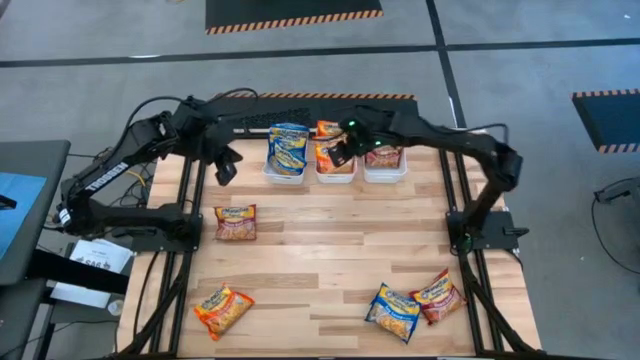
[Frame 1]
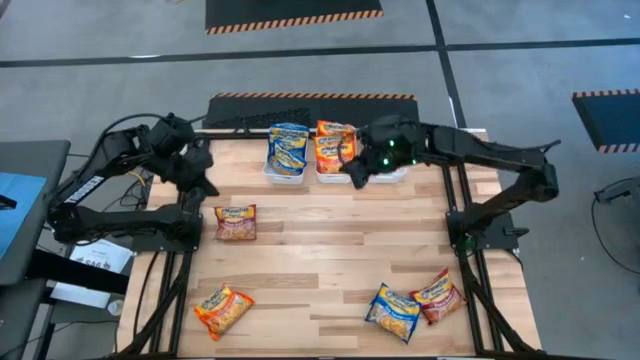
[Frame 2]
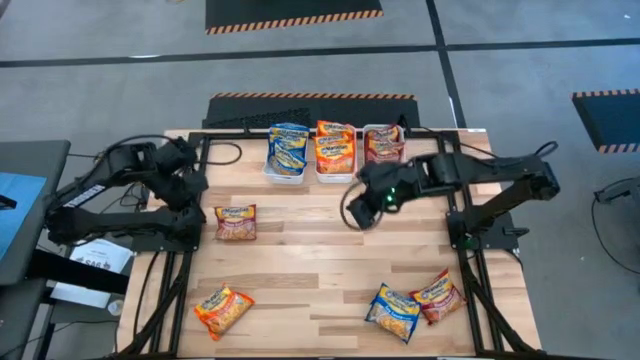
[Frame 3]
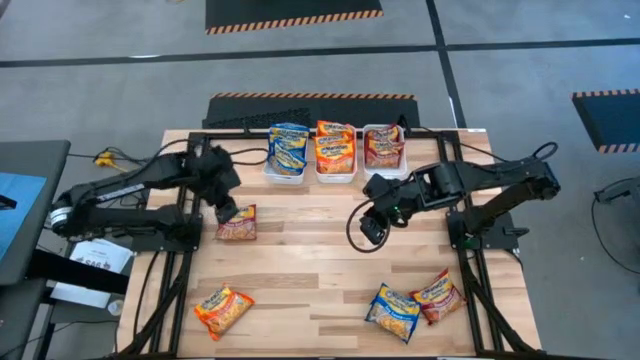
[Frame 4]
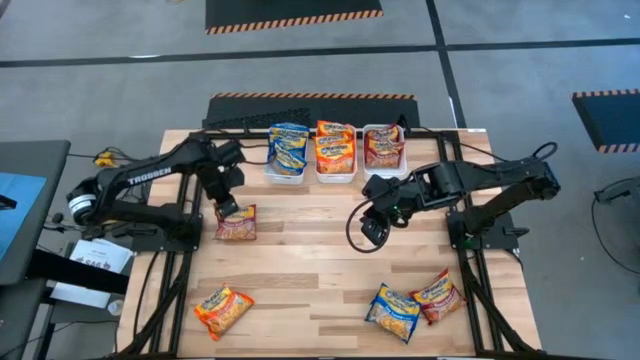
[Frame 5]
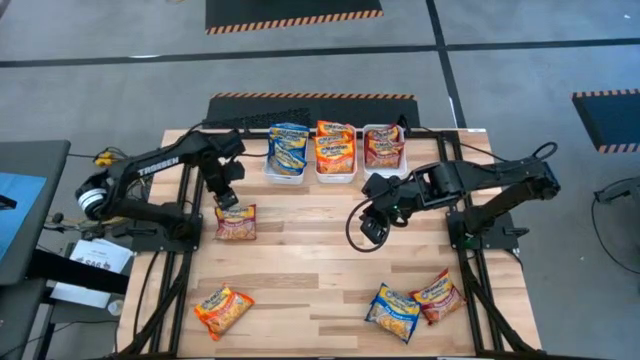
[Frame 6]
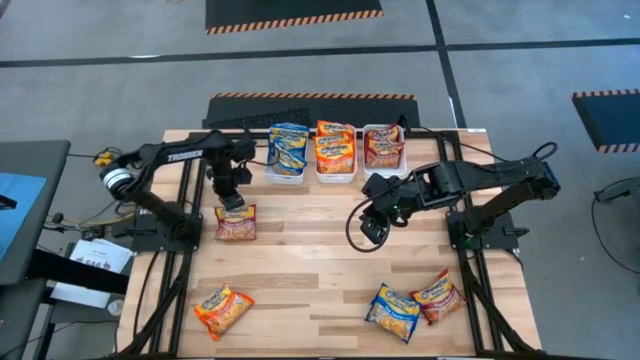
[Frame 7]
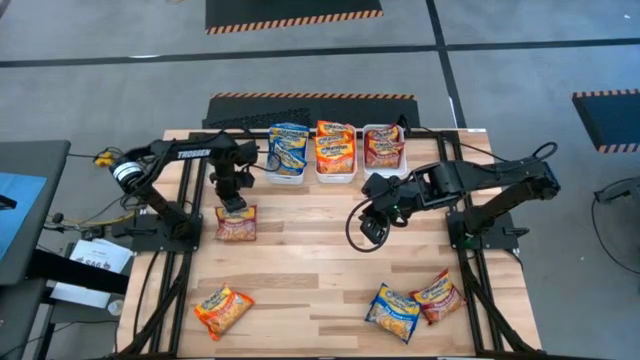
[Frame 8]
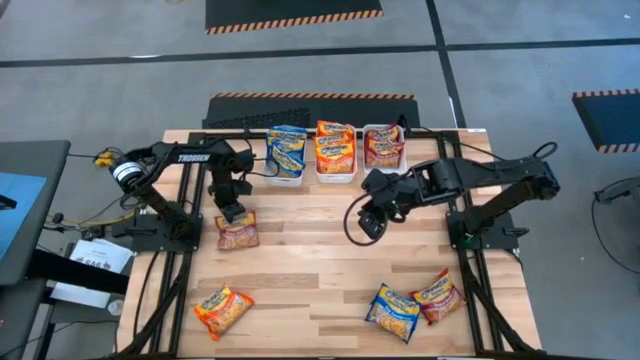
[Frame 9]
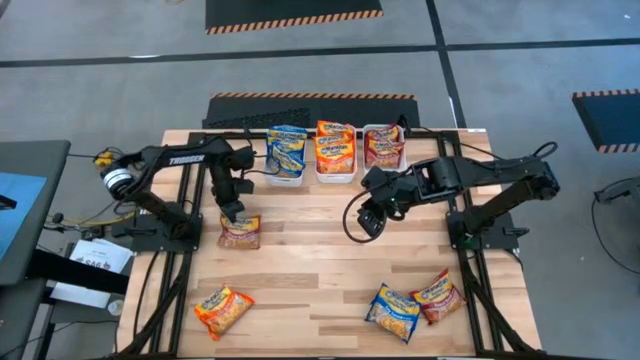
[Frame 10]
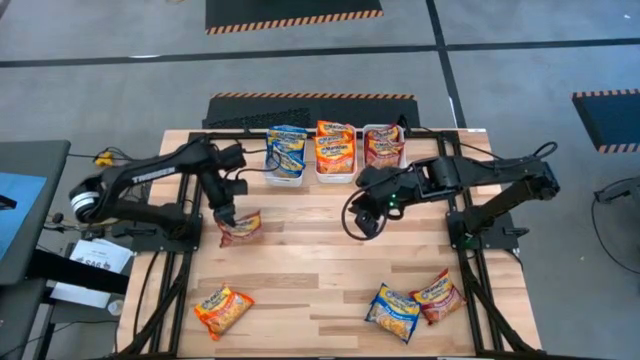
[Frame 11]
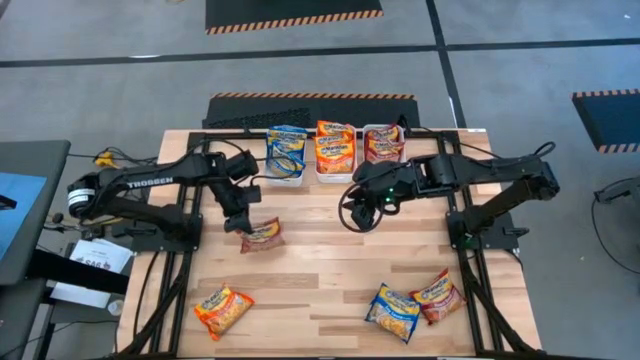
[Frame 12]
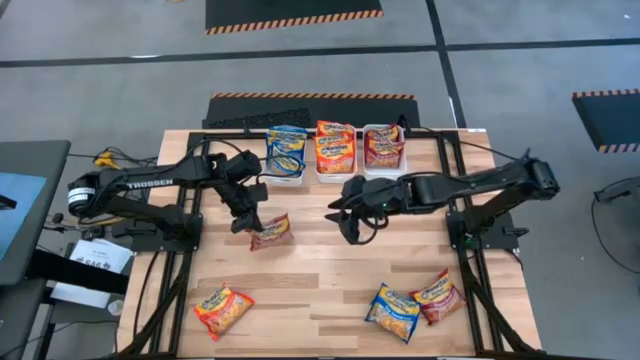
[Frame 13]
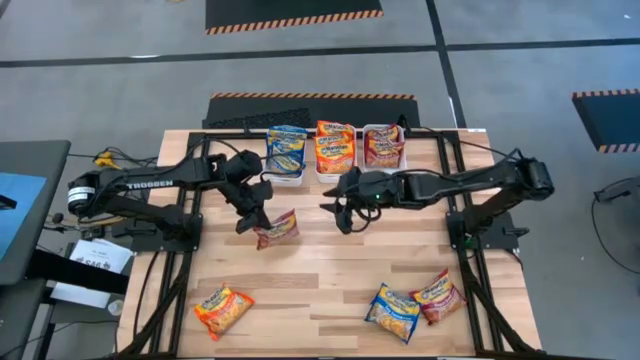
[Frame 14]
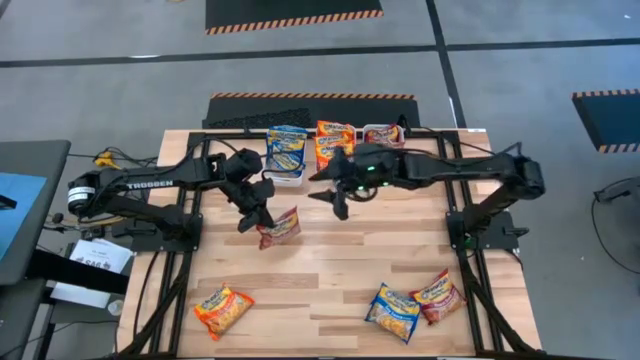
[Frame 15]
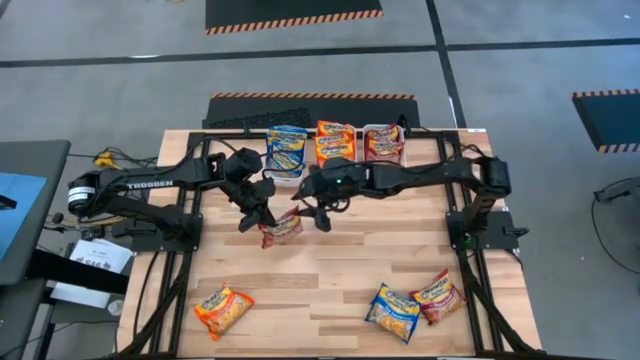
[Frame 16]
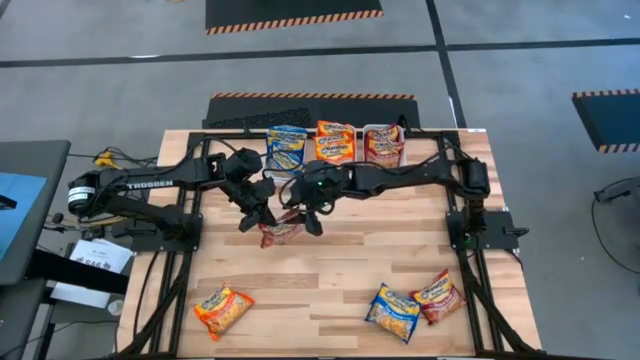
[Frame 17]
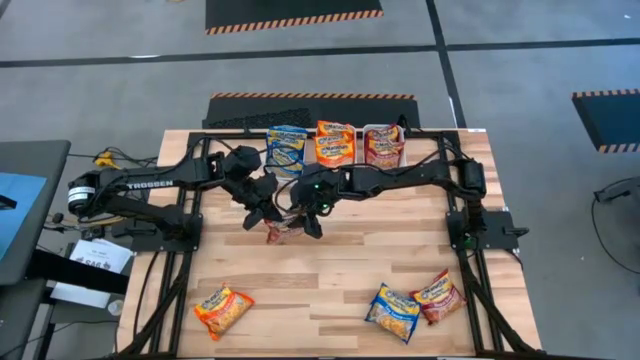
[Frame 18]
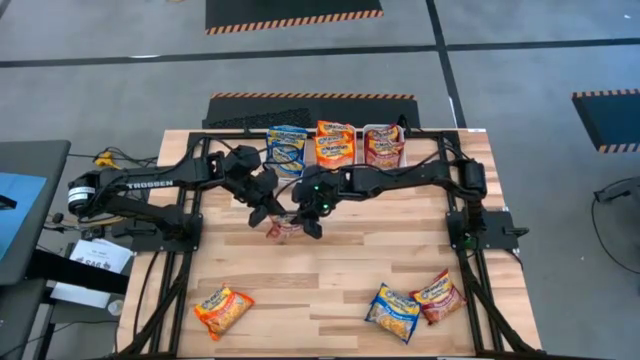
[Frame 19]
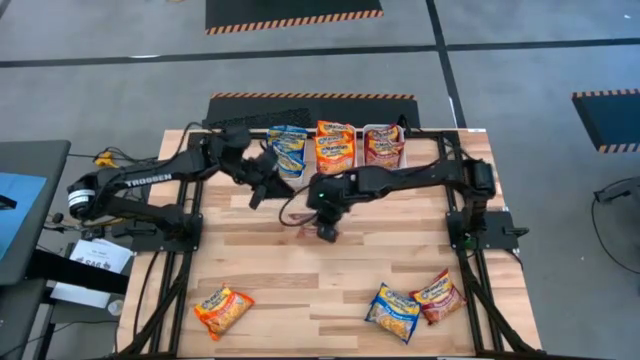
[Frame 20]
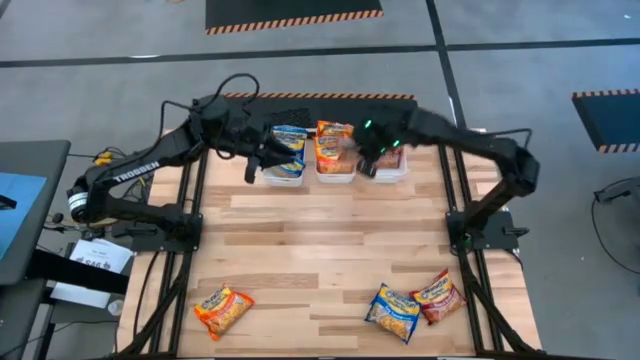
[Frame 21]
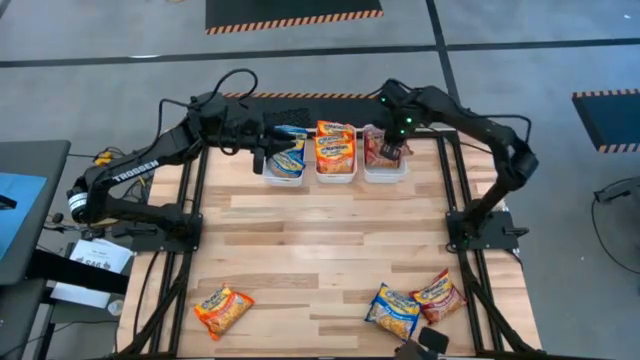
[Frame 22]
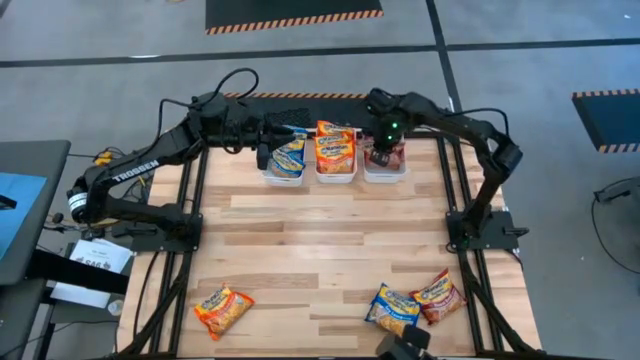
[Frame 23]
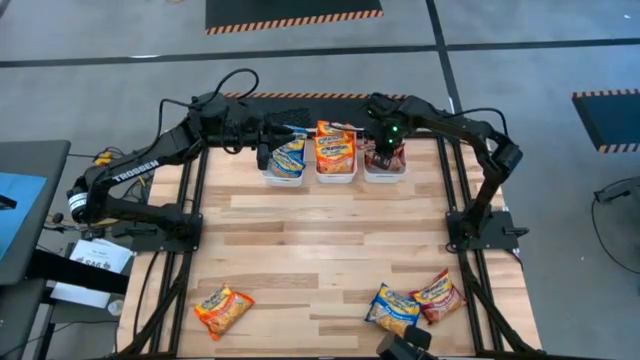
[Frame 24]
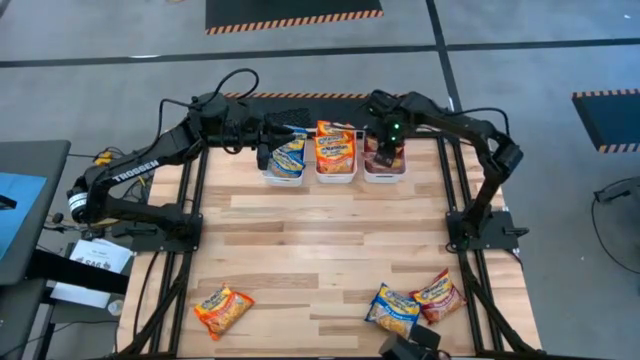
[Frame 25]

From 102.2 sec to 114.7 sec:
Task: Sort Maruchan noodles
Put the red noodle pack into the right white bin

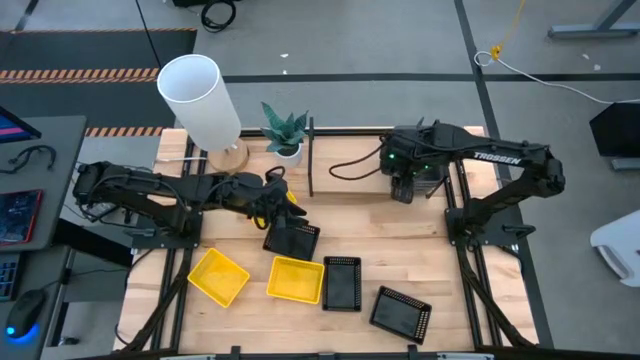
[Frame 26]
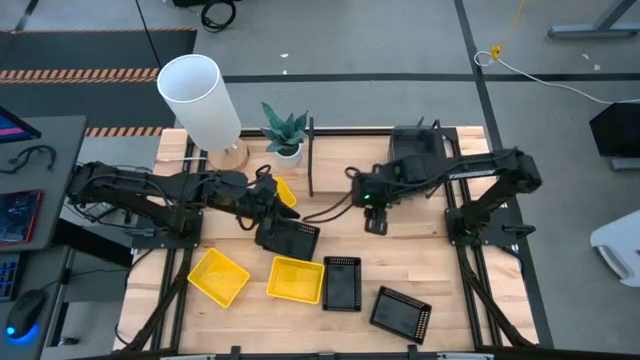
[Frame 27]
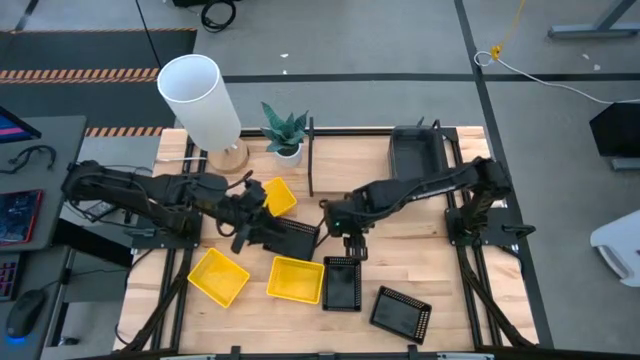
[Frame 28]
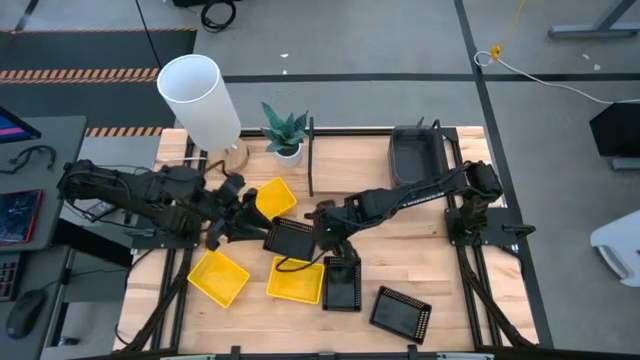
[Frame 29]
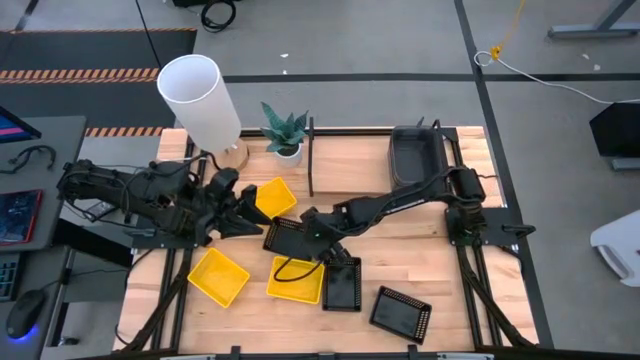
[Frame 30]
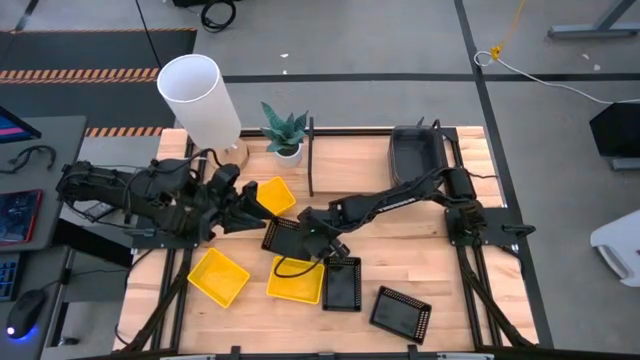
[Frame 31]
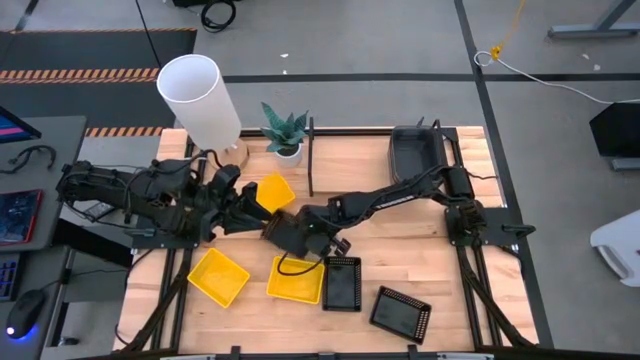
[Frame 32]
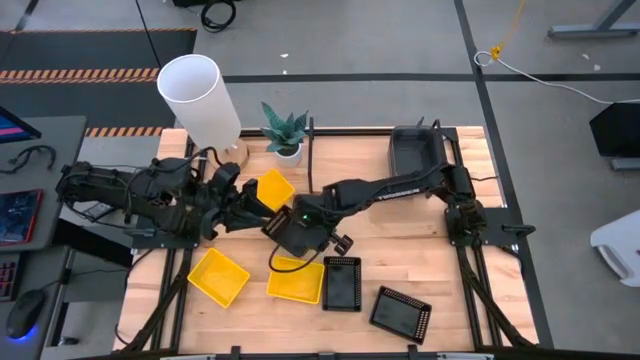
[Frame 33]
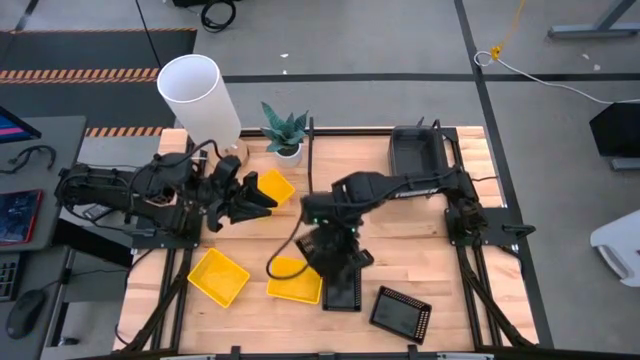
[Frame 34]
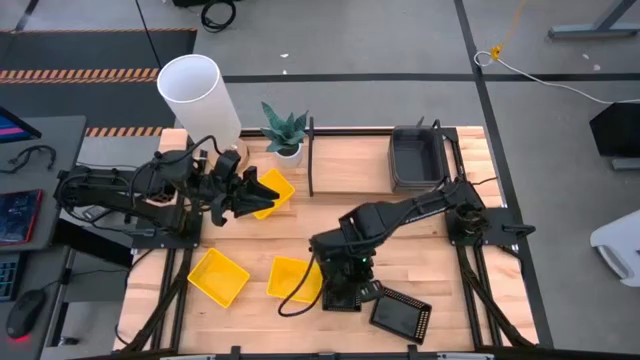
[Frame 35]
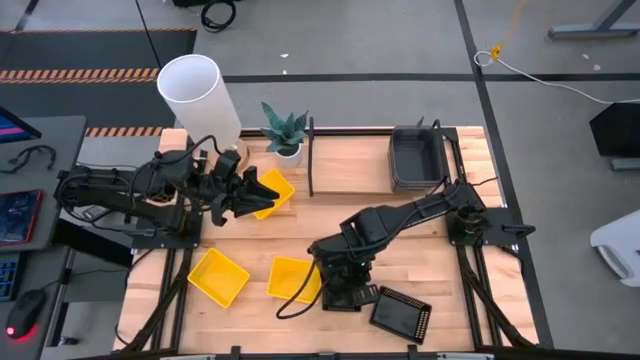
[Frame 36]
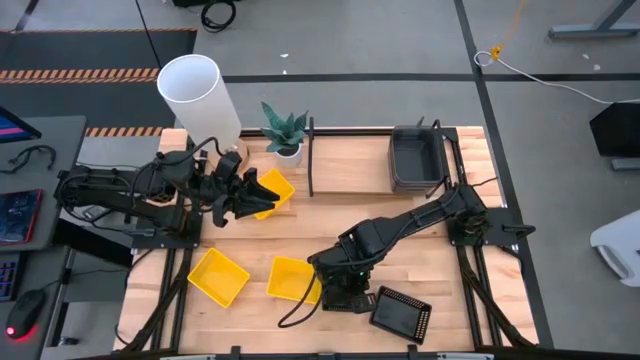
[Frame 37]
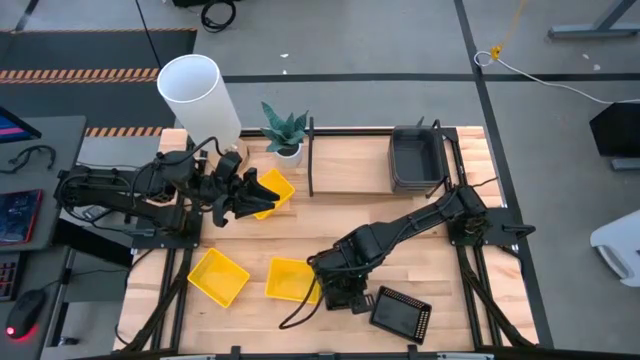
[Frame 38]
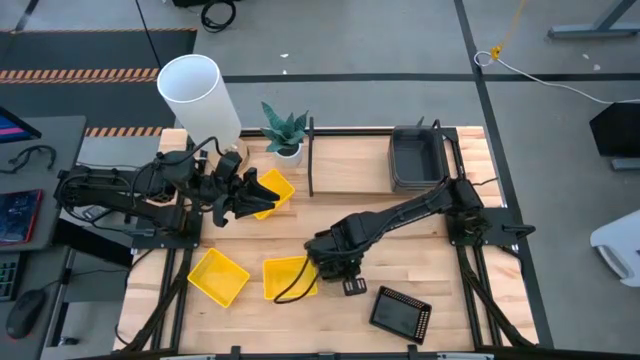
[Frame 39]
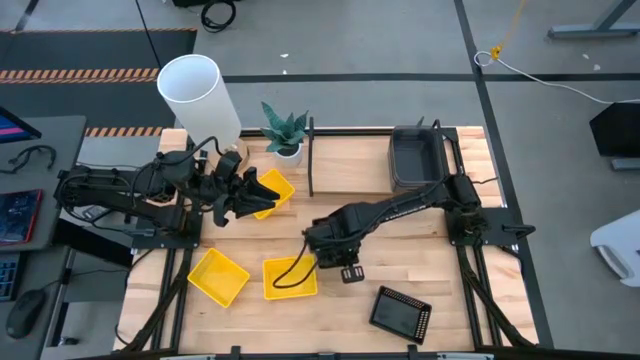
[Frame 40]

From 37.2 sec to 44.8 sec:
Task: Stack baskets on shelf by color
Stack the left black basket on top of the middle black basket

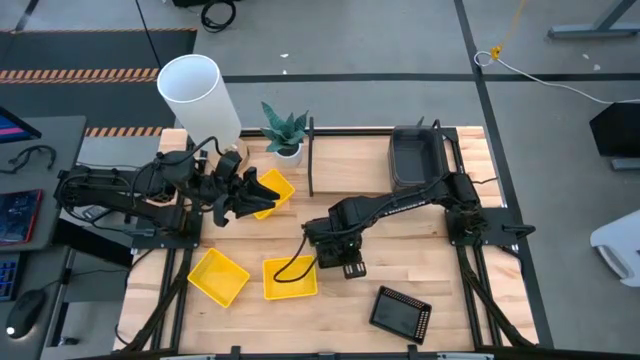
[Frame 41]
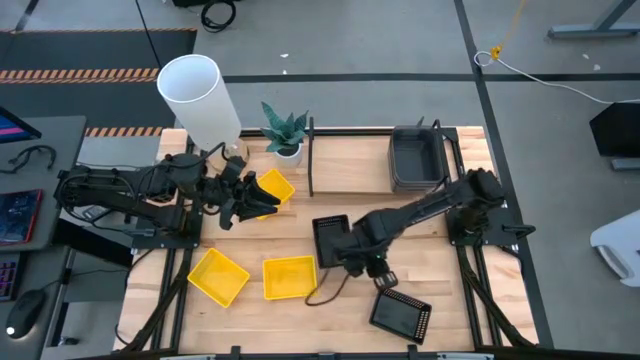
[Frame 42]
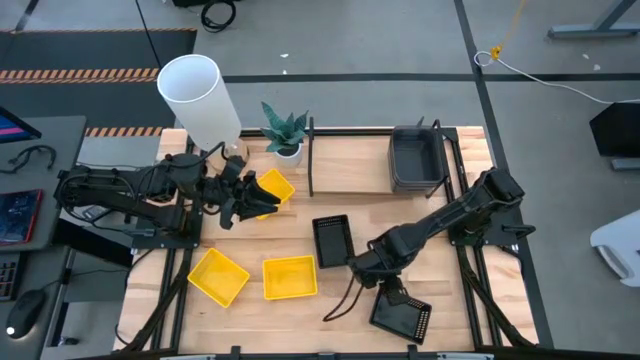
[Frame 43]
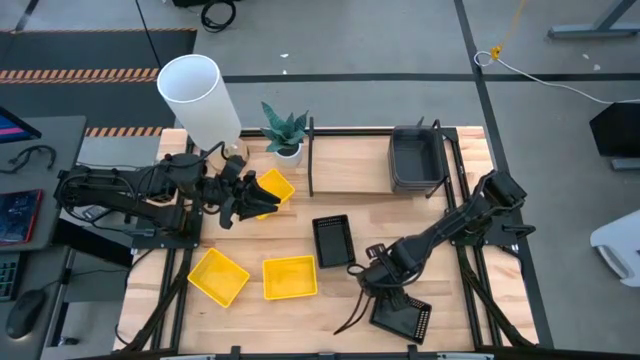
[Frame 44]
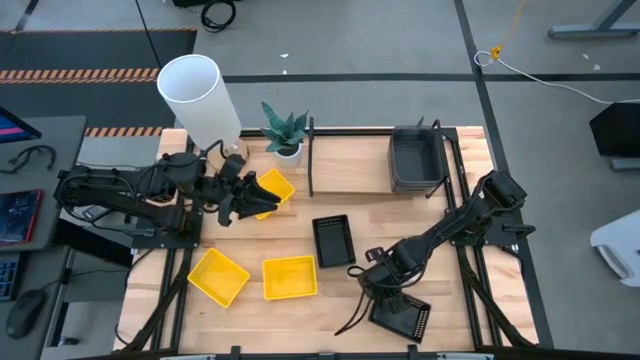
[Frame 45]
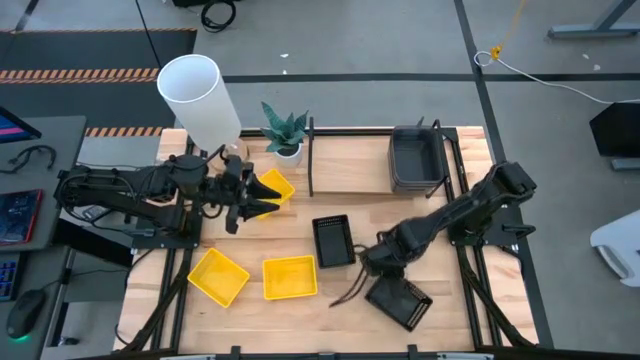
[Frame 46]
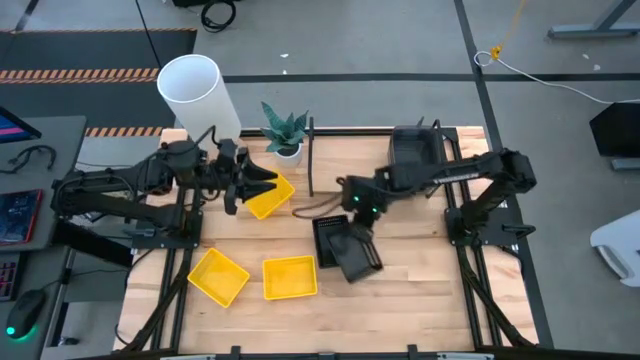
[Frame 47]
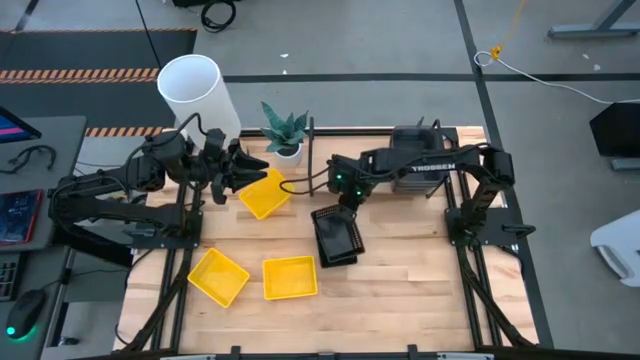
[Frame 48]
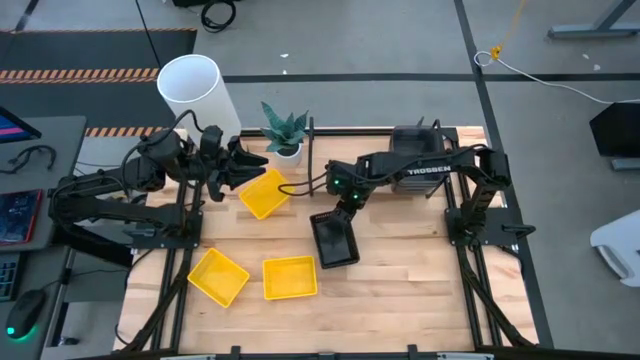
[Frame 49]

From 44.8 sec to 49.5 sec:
Stack the bottom black basket on top of the top black basket
